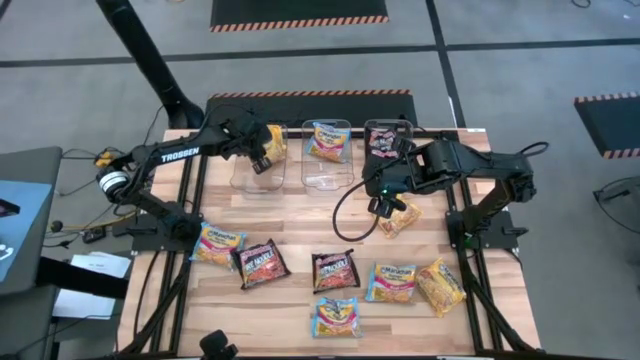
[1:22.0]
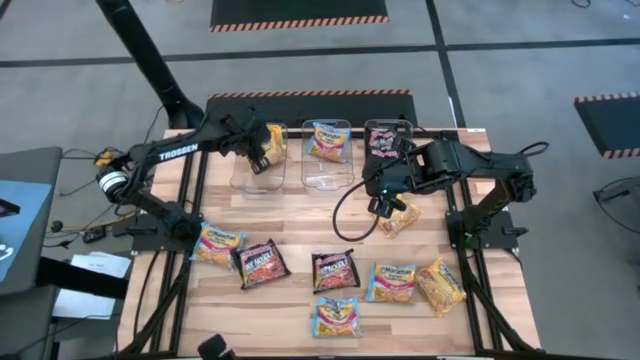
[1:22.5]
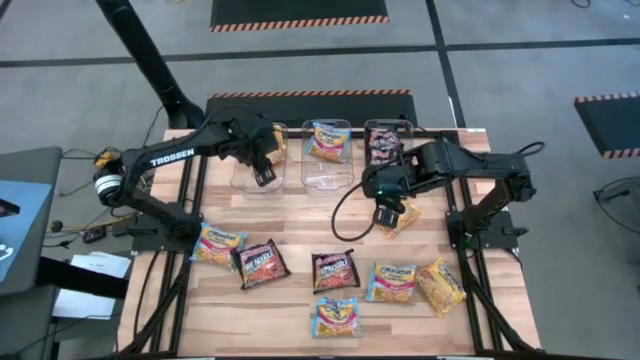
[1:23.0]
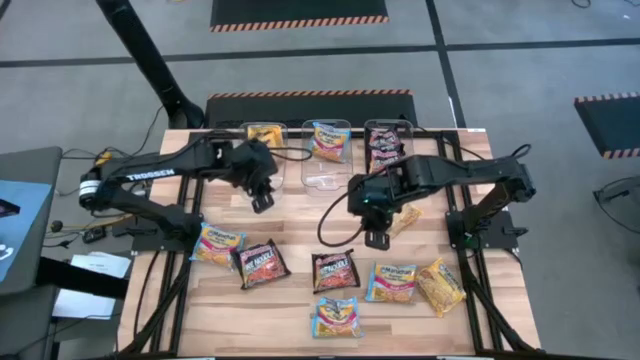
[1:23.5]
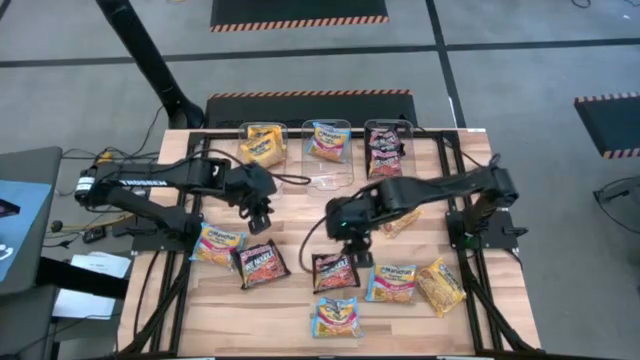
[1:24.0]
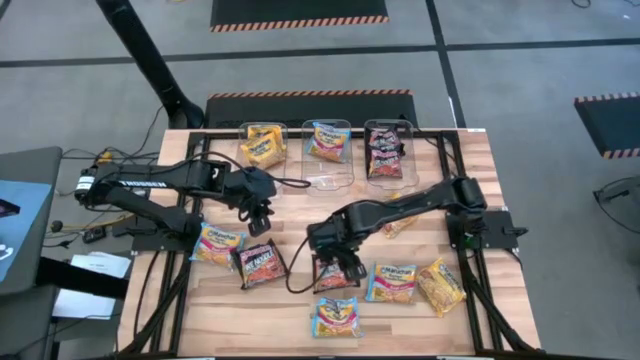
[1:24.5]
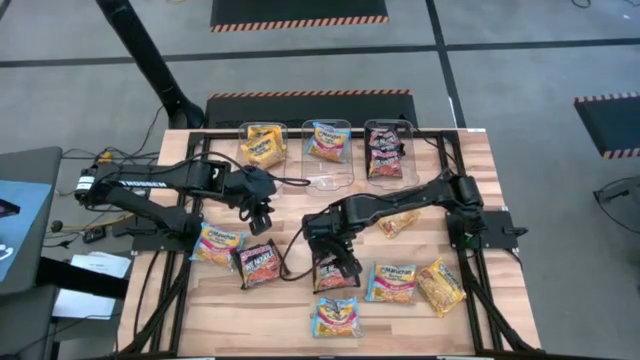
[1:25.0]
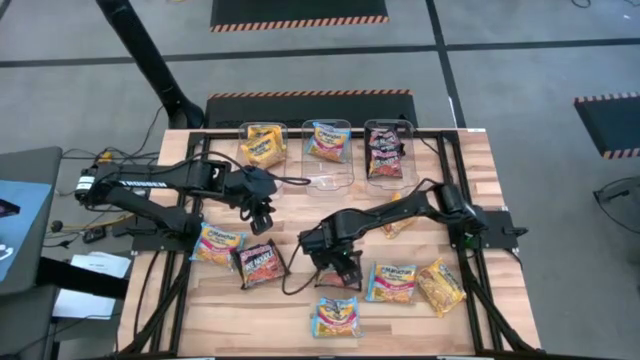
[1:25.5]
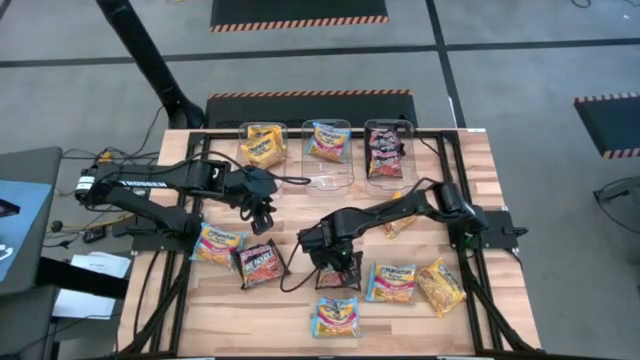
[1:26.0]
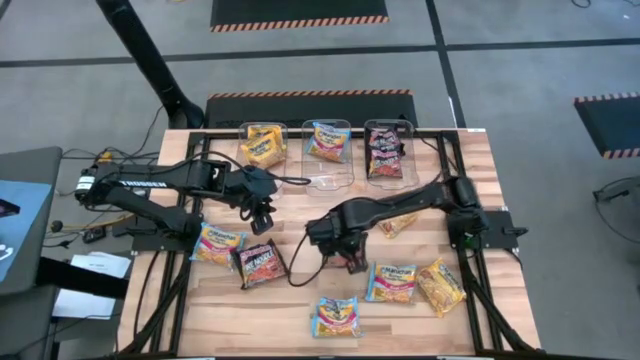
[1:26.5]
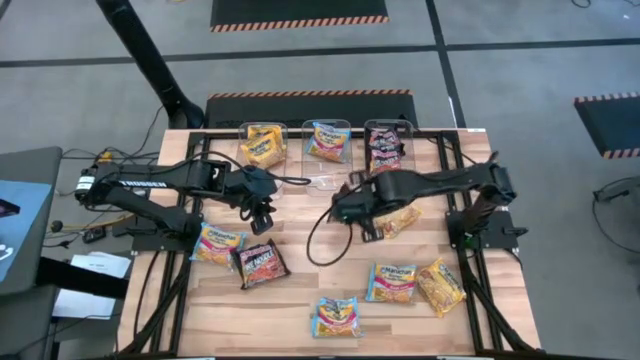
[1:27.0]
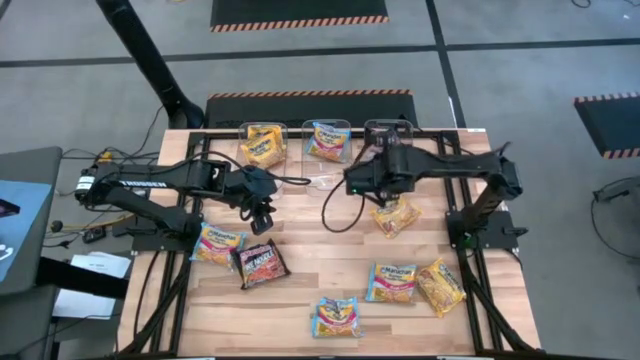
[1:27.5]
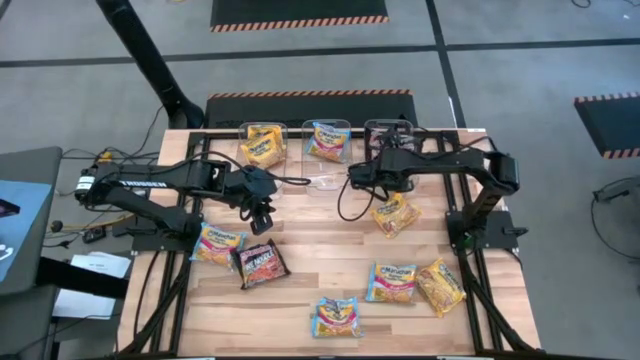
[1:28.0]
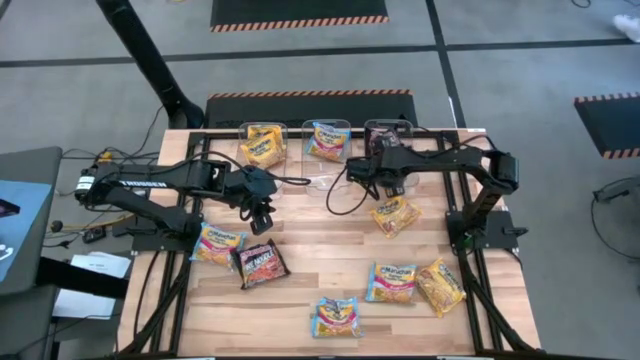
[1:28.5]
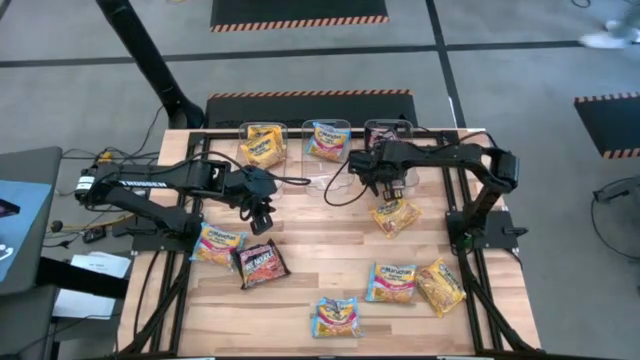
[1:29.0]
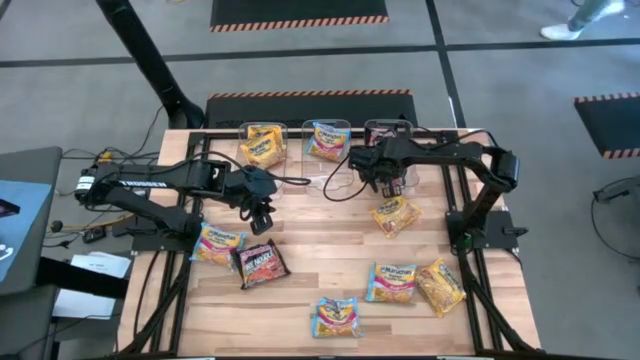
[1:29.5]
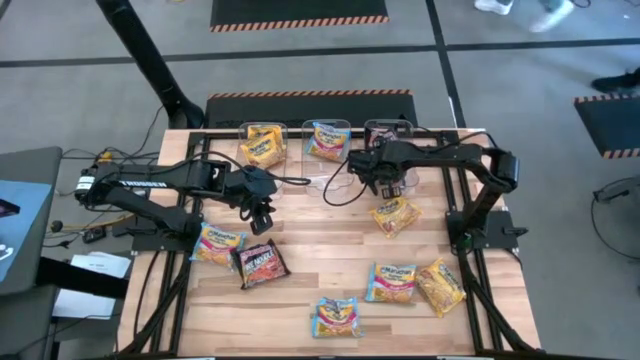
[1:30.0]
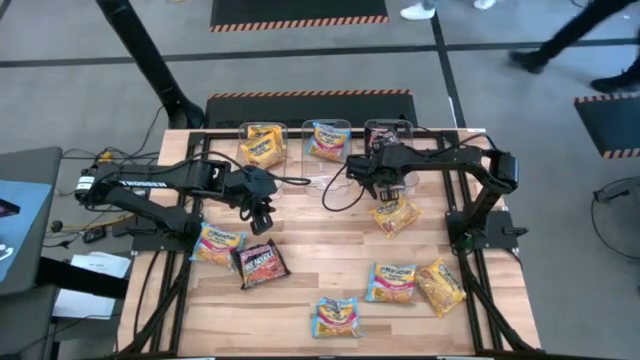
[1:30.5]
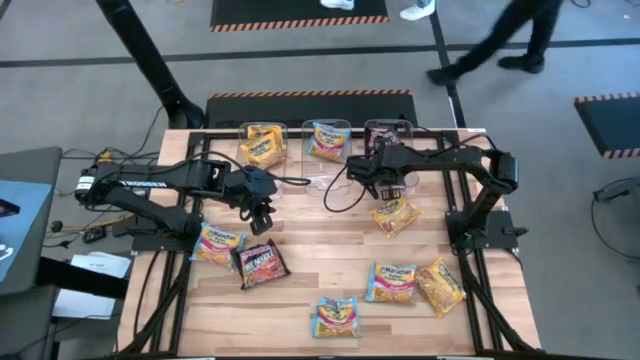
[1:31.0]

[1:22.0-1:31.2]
Task: Sort Maruchan noodles
Put the black noodle pack into the right transparent bin

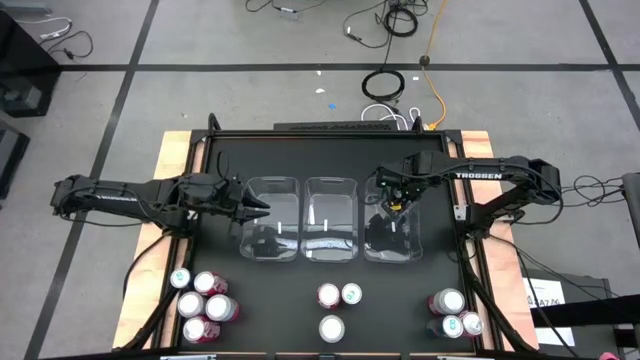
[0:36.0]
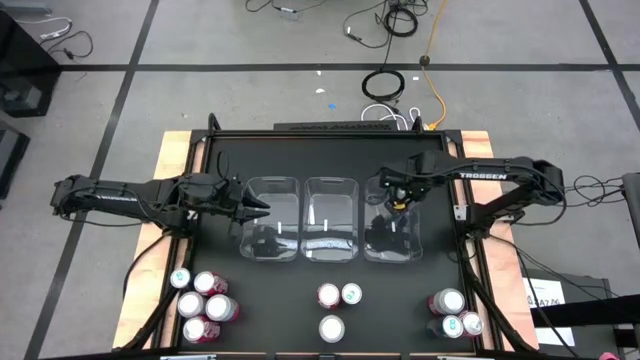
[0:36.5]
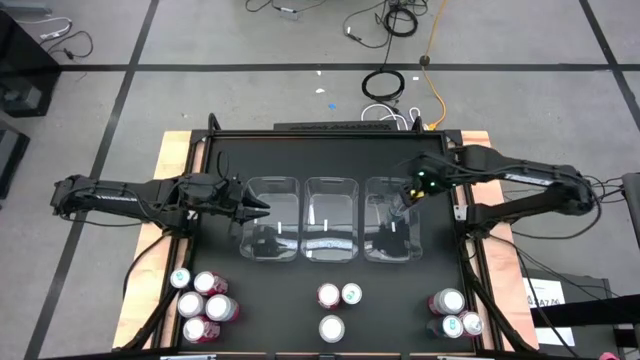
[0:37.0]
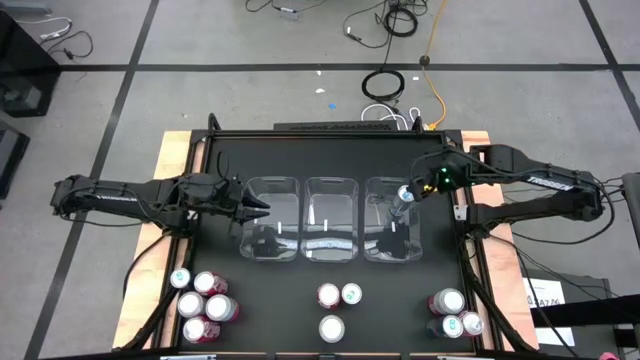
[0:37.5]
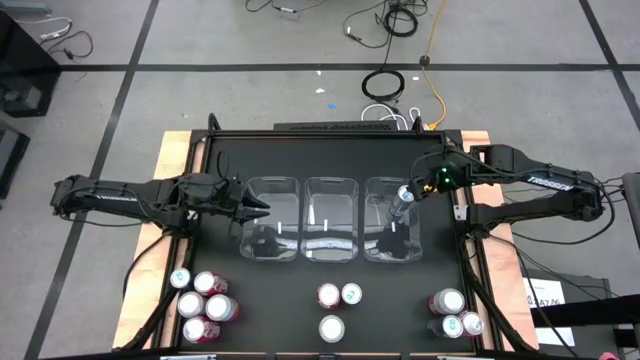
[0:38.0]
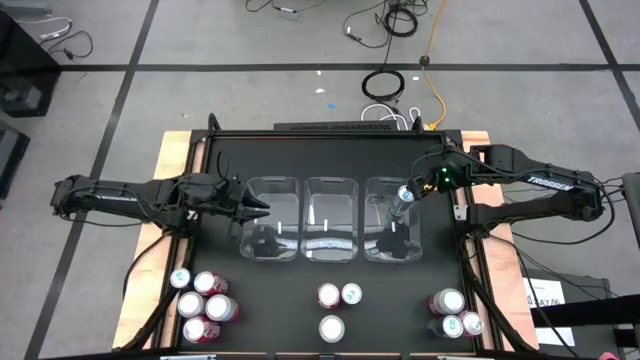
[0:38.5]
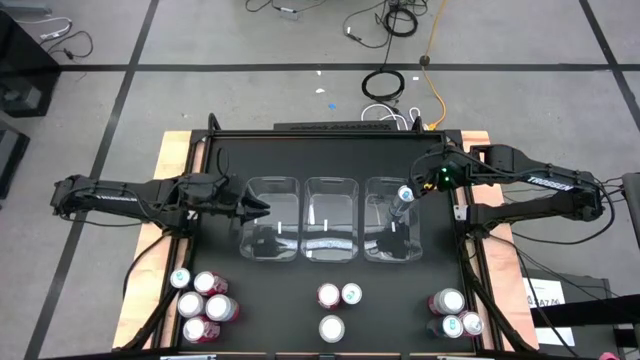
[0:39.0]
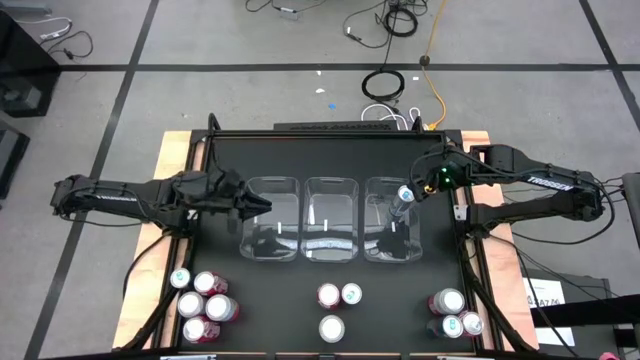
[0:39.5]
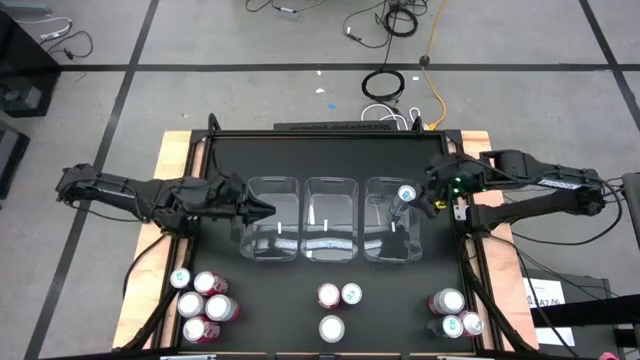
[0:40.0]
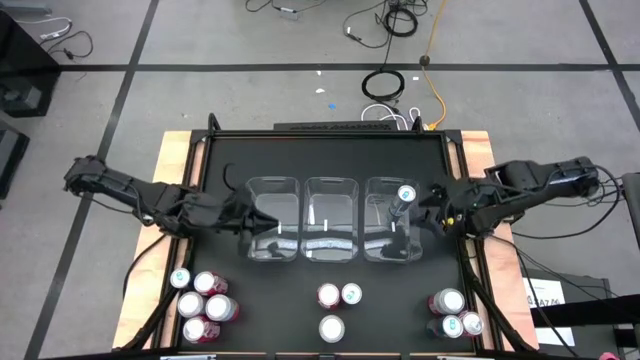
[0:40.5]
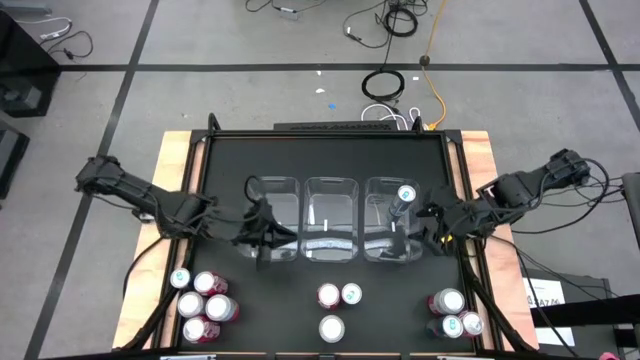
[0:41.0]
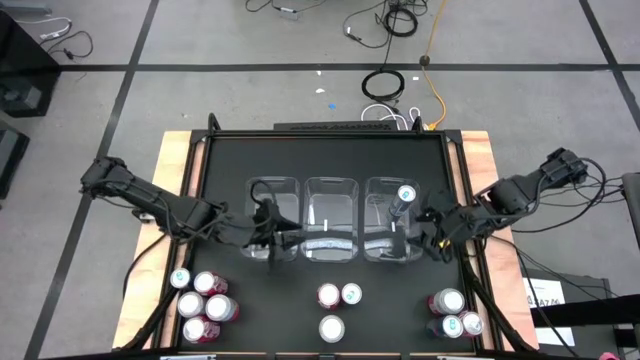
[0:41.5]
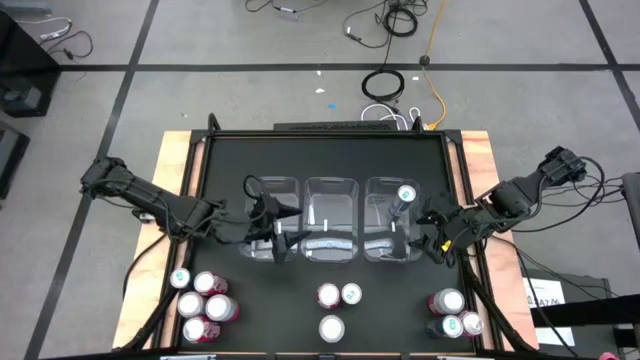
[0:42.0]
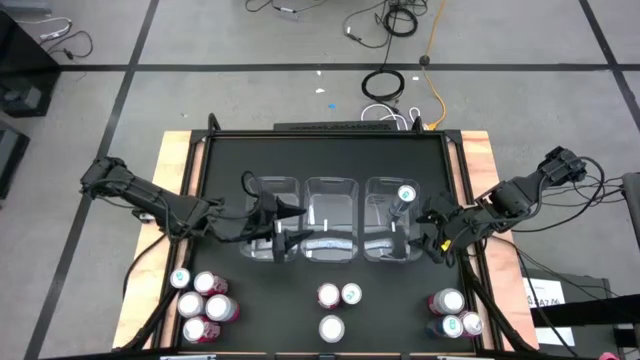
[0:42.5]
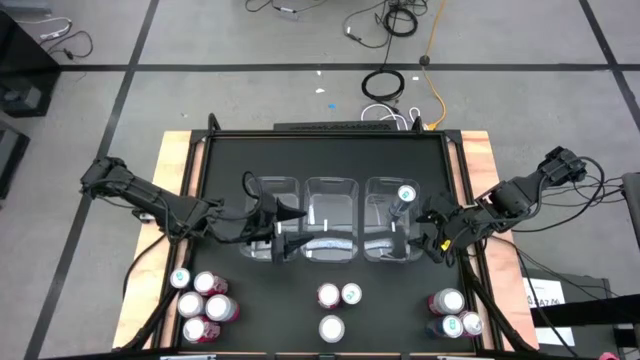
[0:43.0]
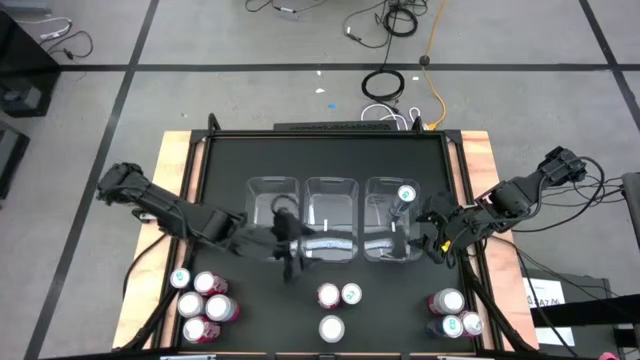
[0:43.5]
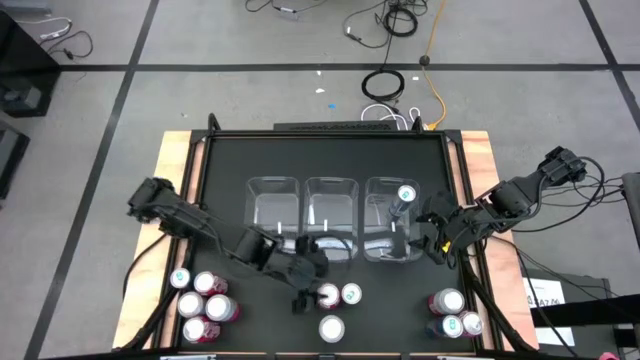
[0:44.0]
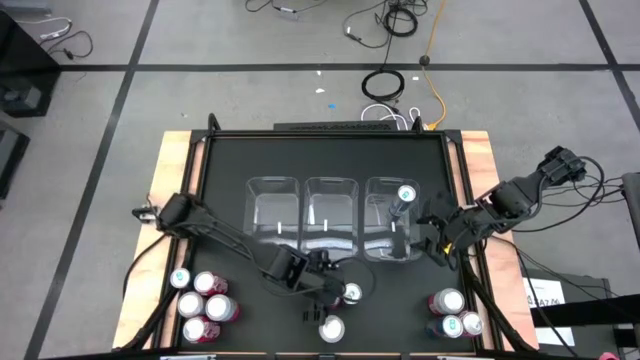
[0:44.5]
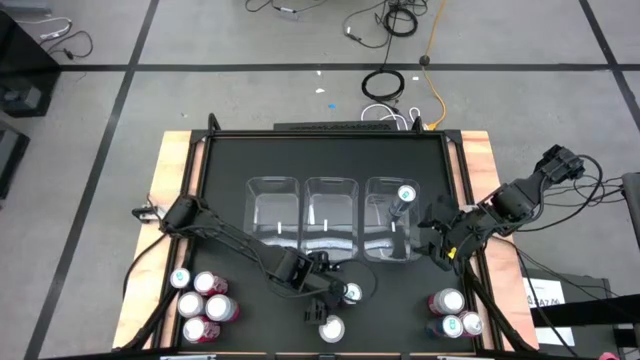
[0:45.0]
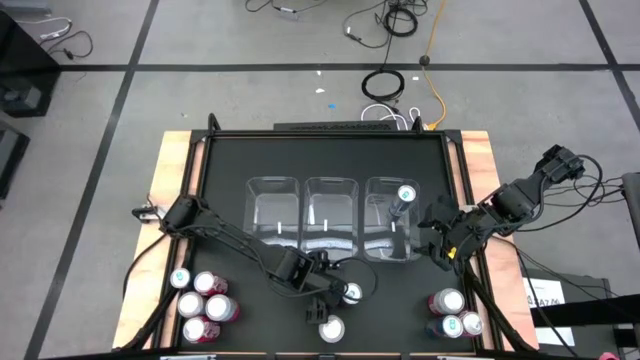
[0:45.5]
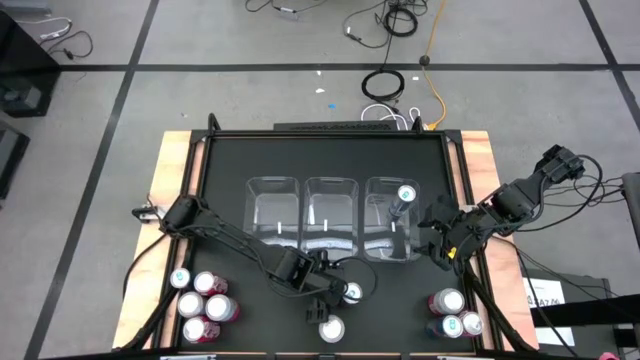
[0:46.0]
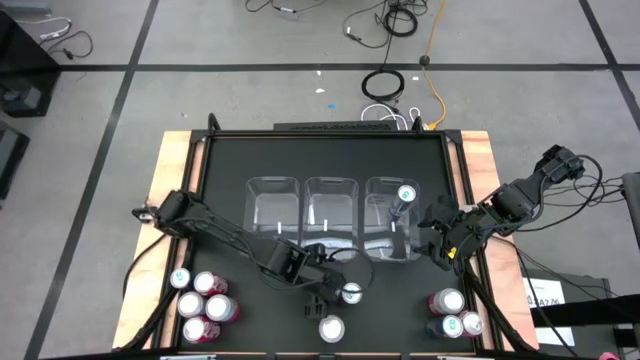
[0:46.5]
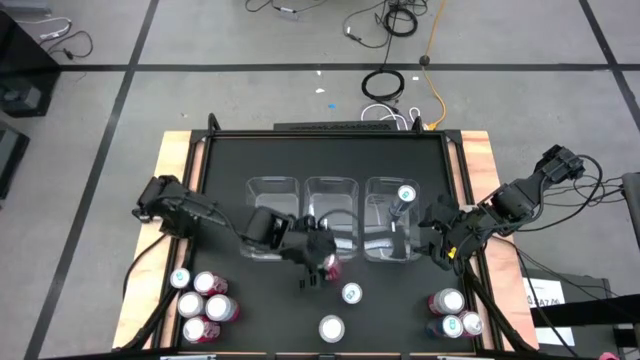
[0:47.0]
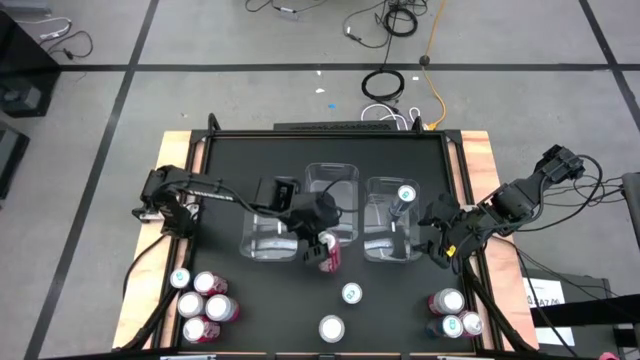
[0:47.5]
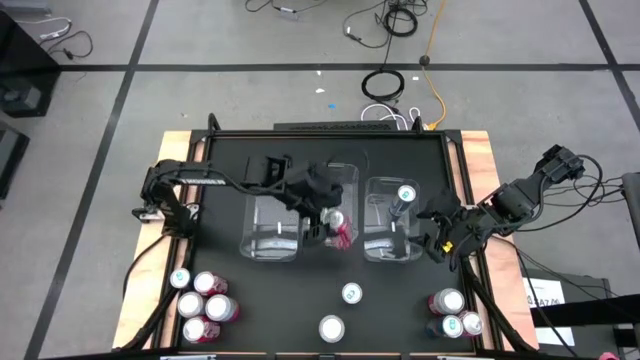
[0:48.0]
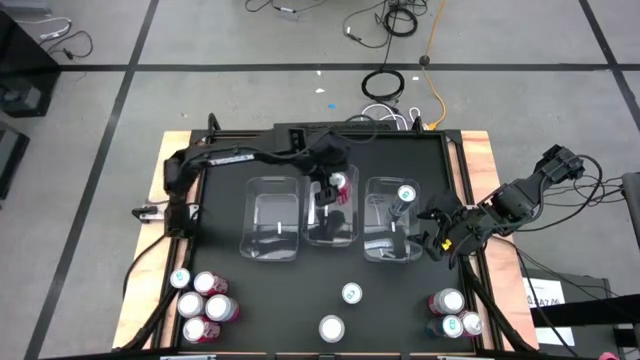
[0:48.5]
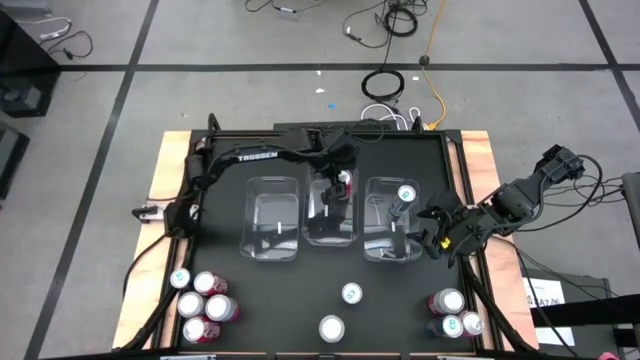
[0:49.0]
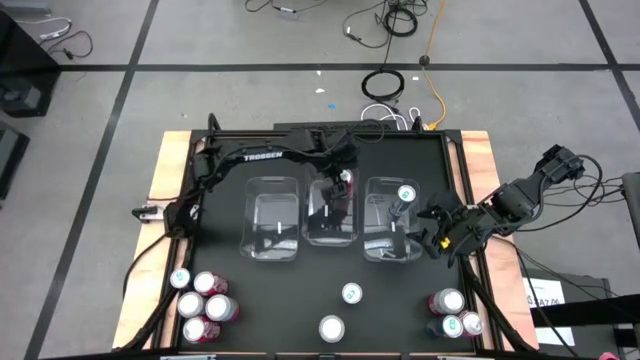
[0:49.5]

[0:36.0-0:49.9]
Task: Sort soda cans
Put the top center red soda can into the center transparent bin
